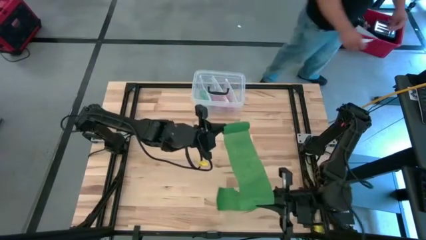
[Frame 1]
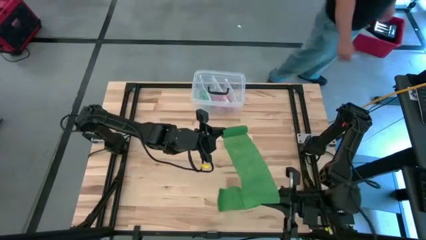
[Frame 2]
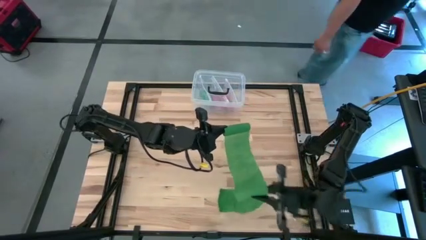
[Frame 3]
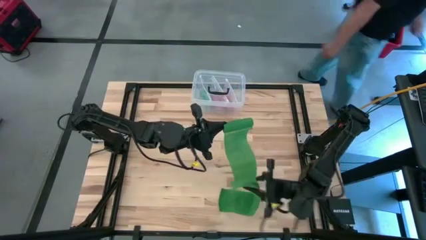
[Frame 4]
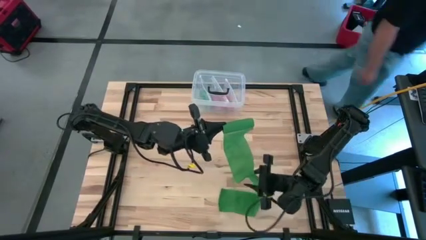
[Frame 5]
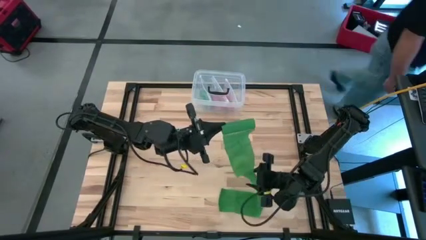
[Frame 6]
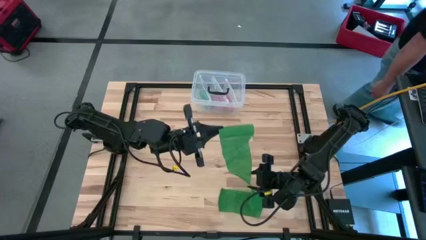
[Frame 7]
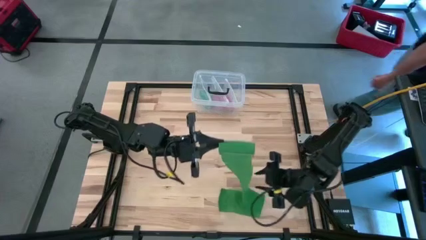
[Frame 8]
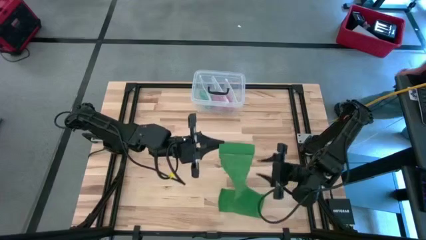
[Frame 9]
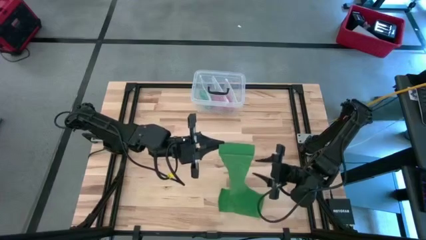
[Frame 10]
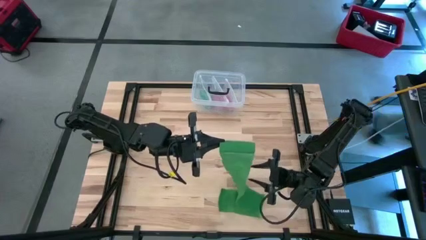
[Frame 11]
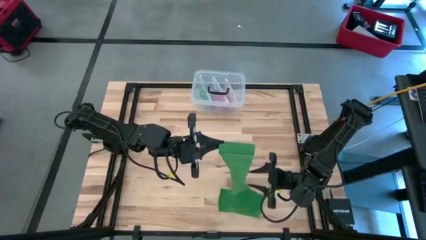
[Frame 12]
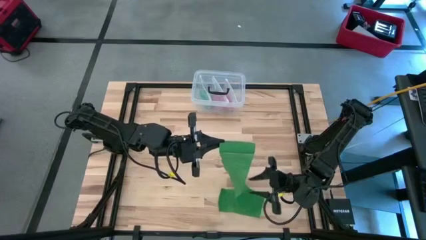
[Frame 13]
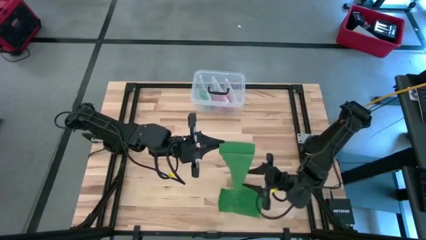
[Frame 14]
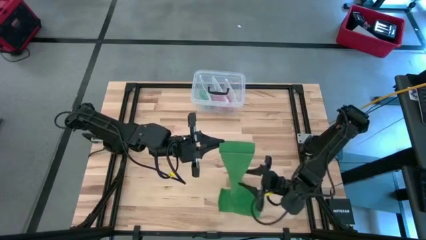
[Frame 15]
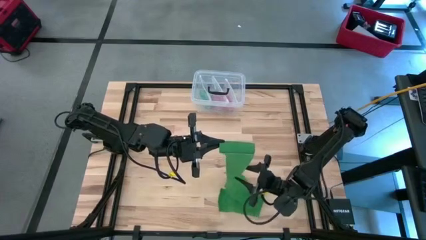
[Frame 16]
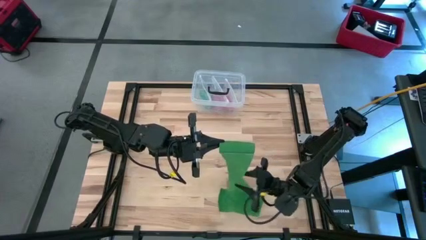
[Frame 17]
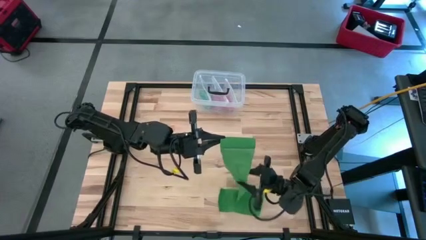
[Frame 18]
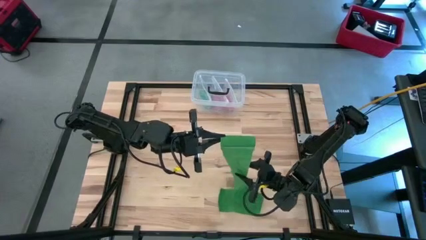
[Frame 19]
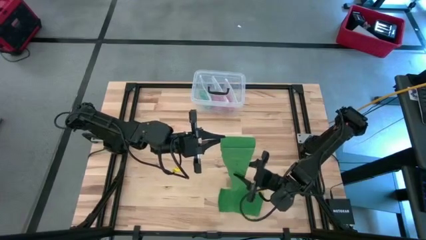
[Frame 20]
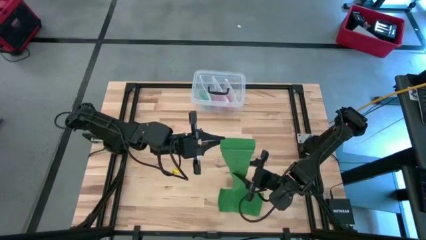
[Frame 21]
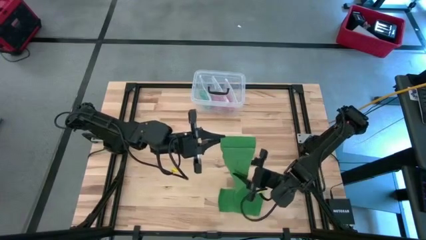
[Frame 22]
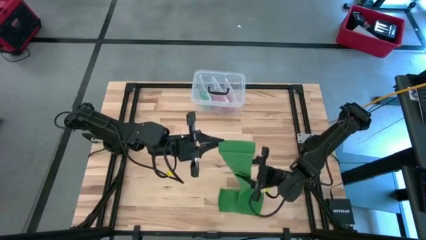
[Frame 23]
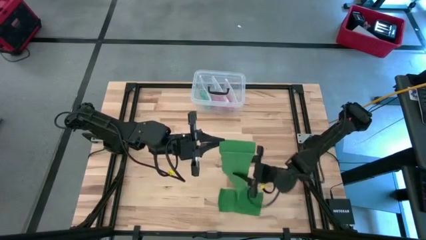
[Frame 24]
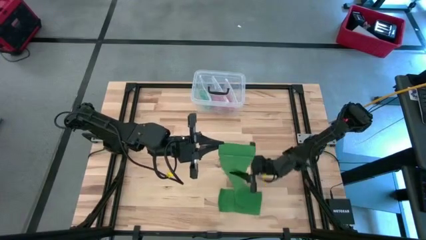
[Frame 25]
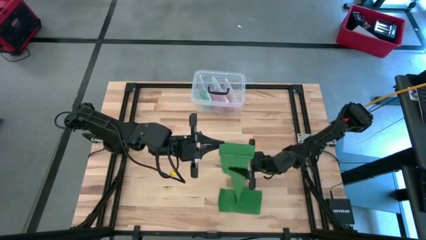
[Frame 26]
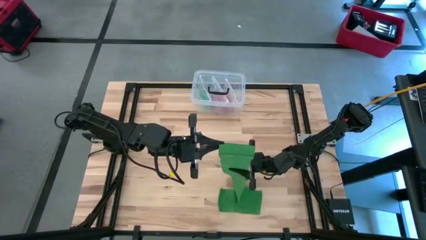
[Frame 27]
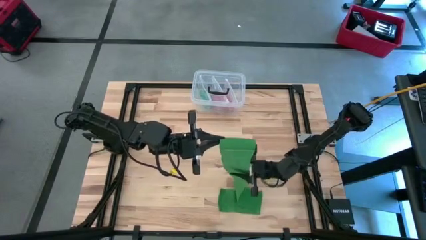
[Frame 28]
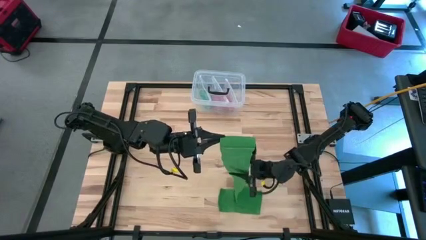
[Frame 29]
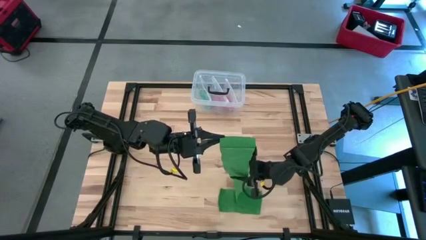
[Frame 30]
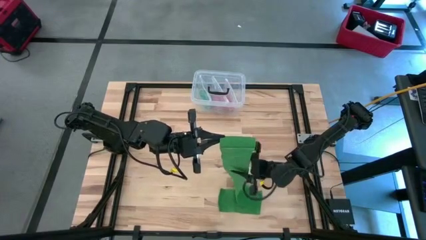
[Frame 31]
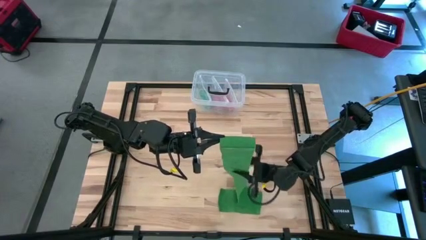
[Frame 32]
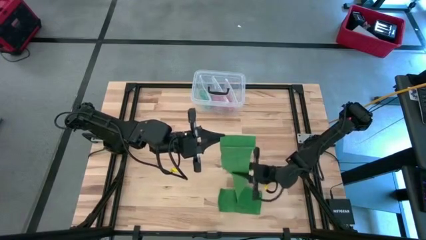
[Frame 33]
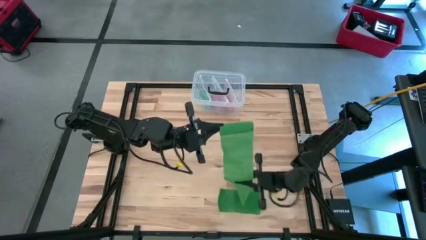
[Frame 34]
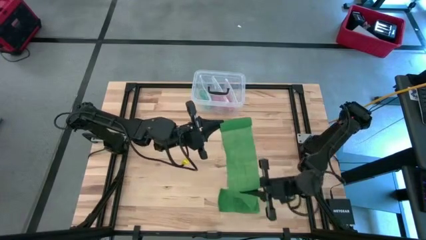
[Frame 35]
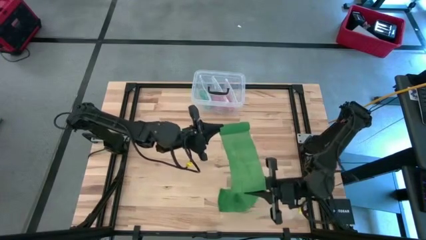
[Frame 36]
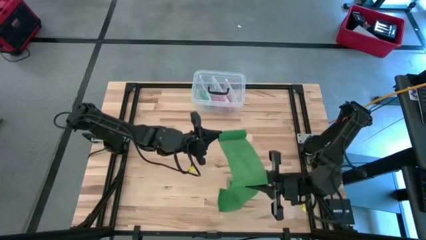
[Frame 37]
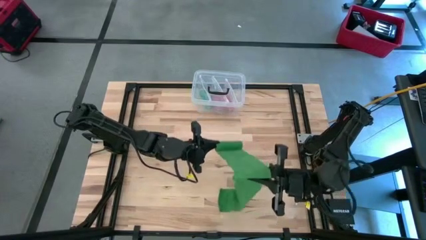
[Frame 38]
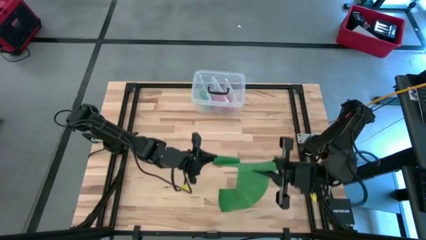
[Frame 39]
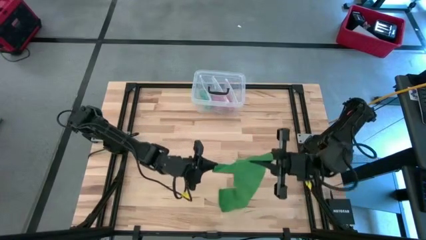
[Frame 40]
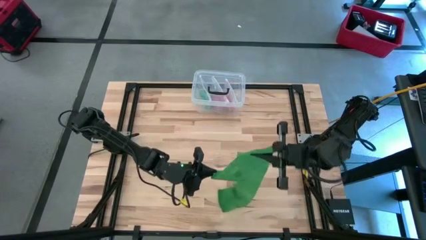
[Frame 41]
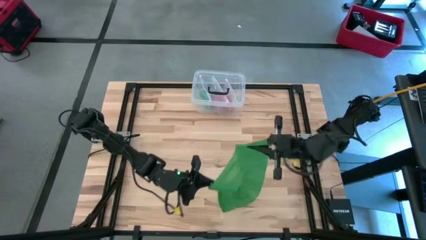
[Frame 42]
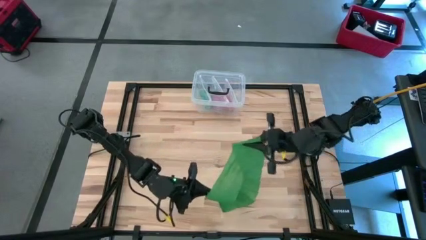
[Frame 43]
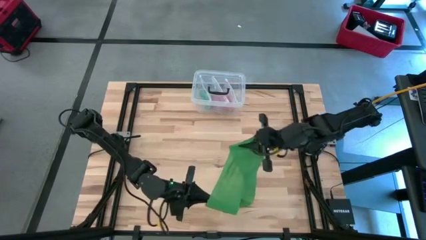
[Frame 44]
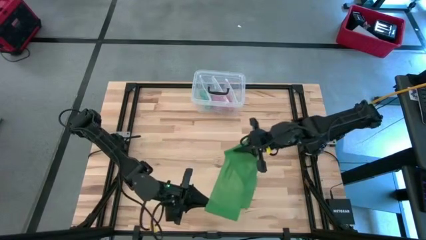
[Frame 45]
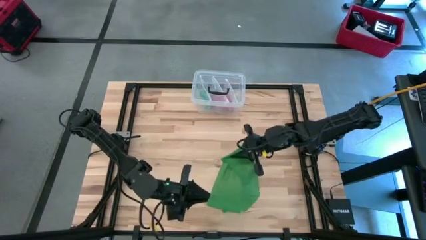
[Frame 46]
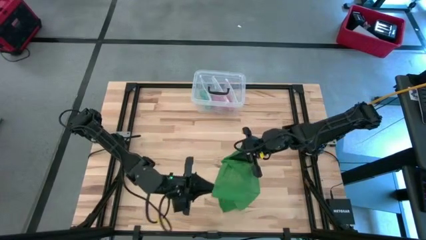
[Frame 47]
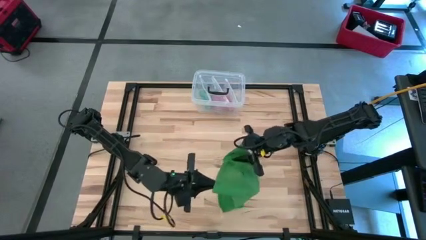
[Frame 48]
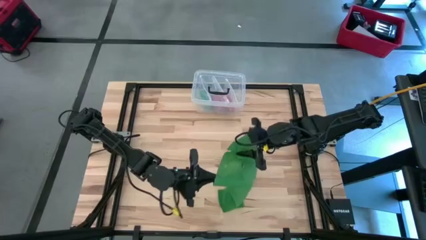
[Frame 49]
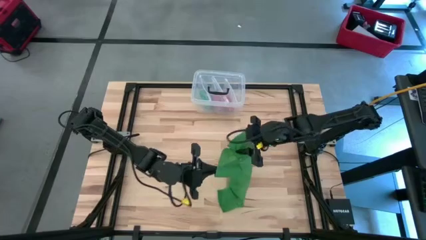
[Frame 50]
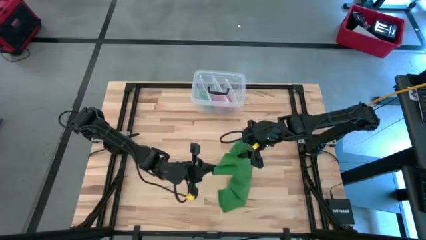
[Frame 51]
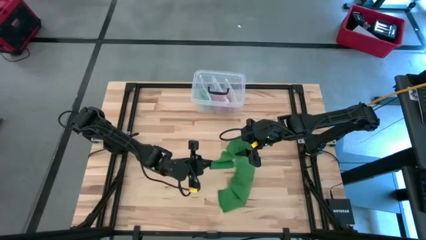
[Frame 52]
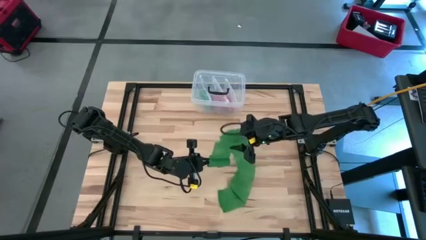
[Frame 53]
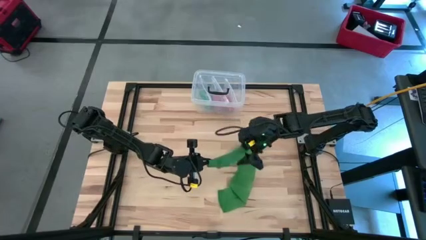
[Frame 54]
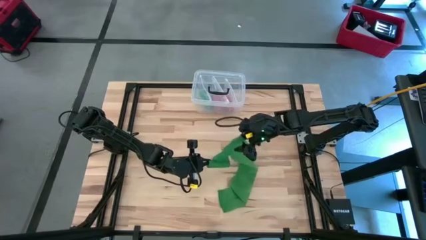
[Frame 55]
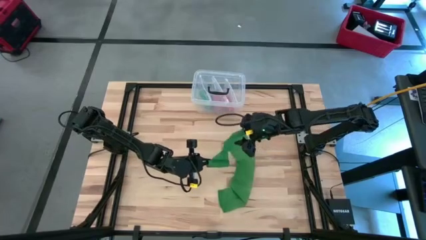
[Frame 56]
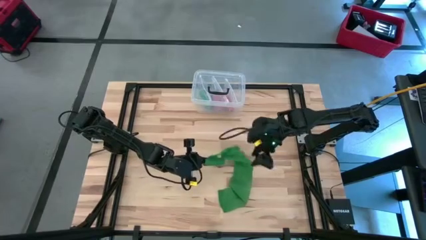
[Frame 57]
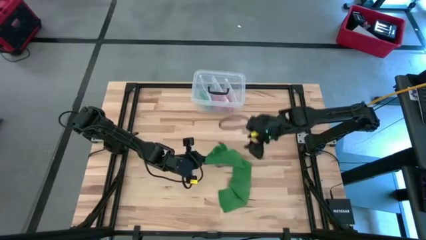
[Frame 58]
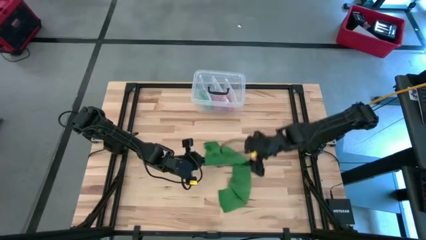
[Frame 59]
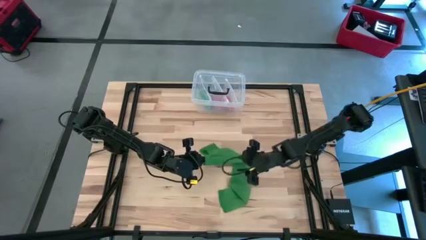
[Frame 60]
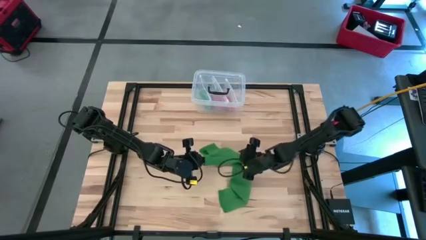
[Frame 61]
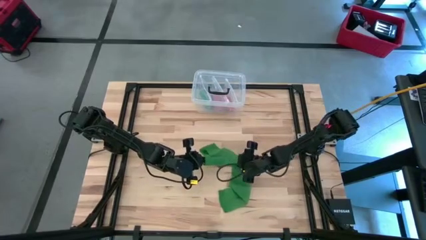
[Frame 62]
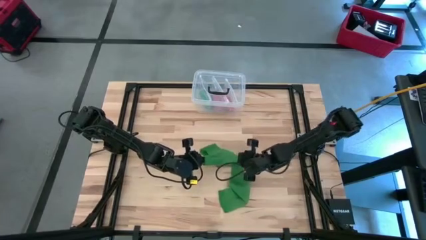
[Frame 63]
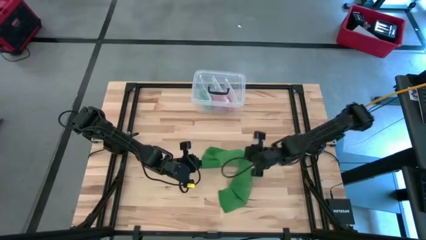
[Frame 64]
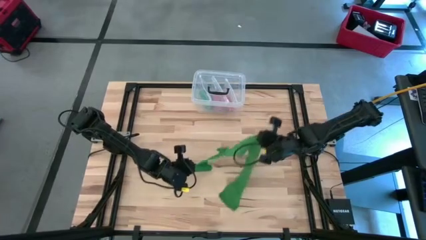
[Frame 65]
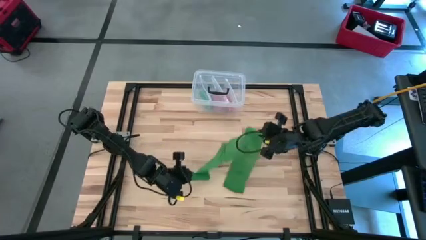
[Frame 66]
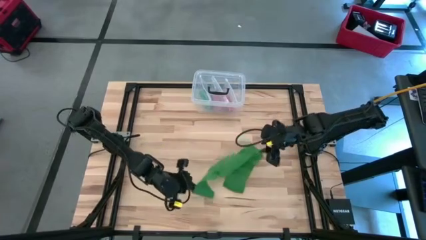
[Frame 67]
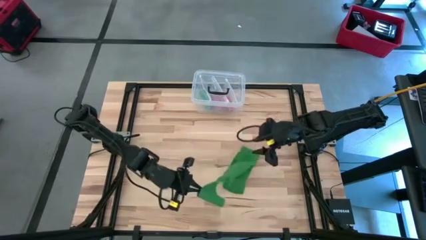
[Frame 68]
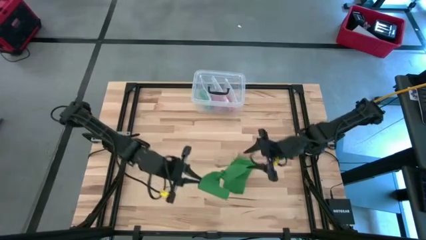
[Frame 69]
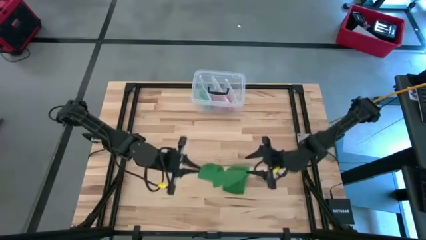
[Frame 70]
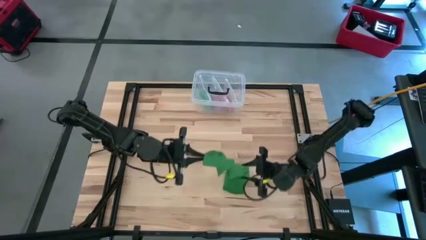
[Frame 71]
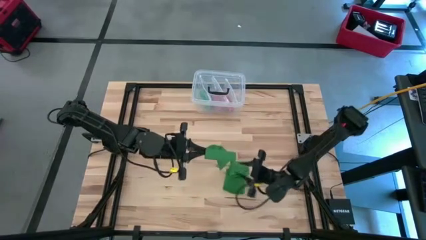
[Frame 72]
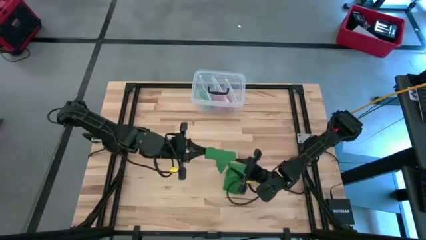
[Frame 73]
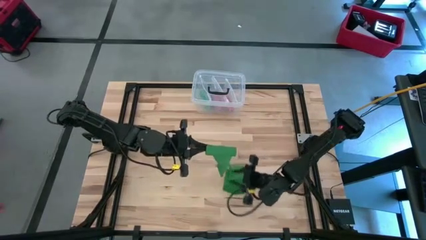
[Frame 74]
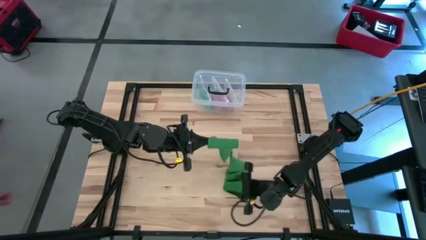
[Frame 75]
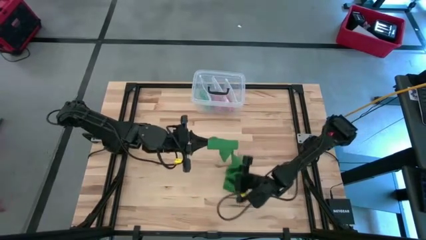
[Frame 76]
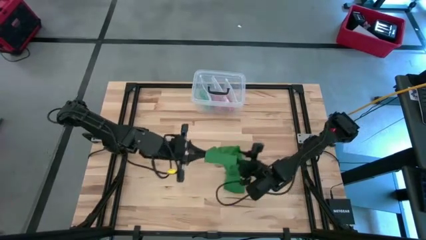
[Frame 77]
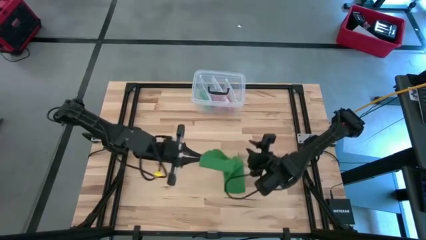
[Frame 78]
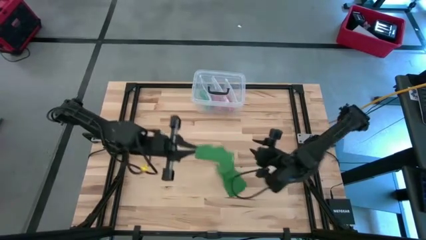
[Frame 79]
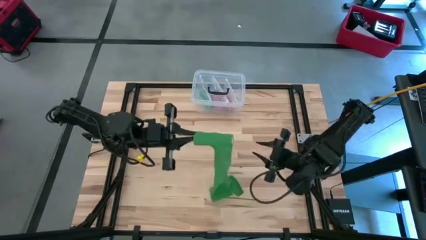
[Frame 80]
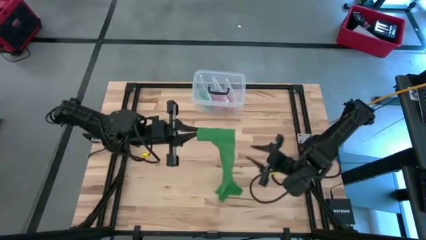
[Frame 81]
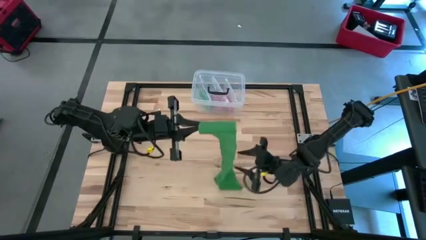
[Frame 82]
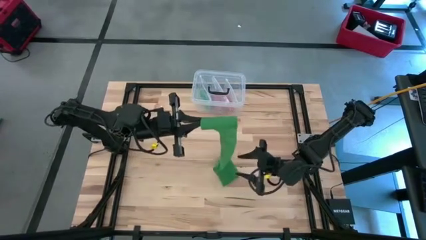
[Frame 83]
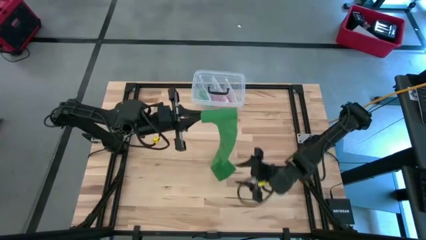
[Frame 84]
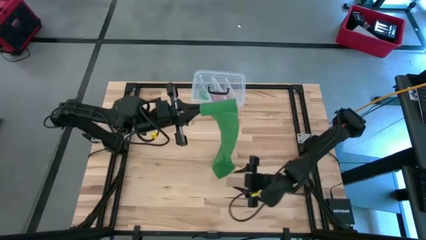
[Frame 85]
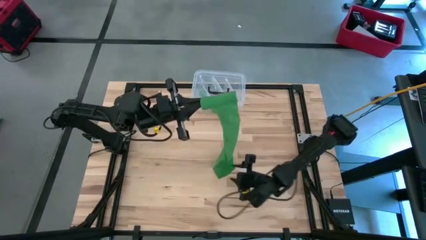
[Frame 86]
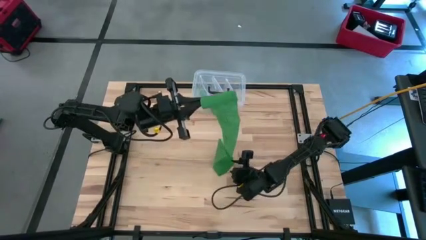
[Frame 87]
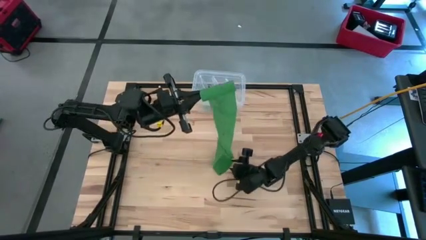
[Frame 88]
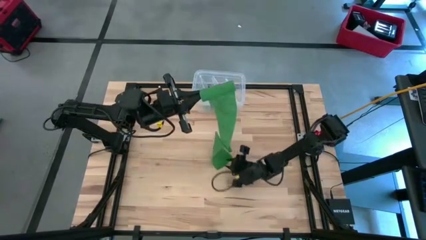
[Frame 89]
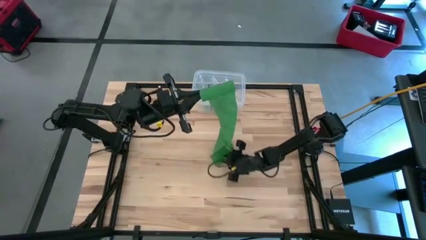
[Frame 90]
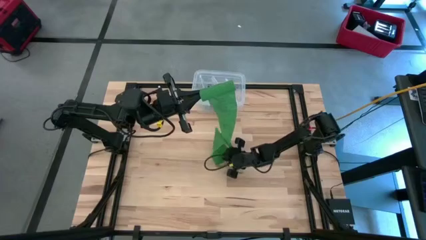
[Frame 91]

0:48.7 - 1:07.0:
Task: Roll bandage
Roll the green bandage
